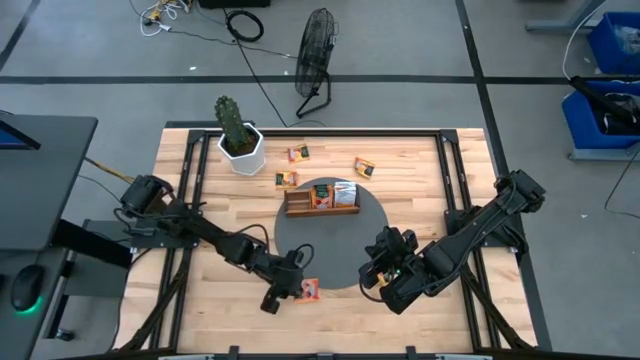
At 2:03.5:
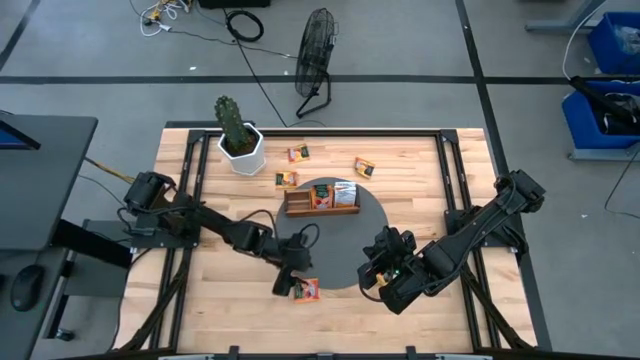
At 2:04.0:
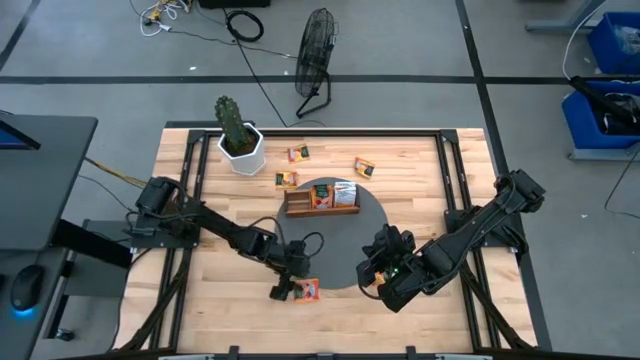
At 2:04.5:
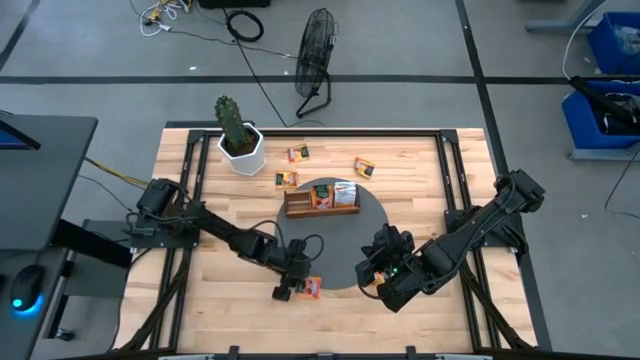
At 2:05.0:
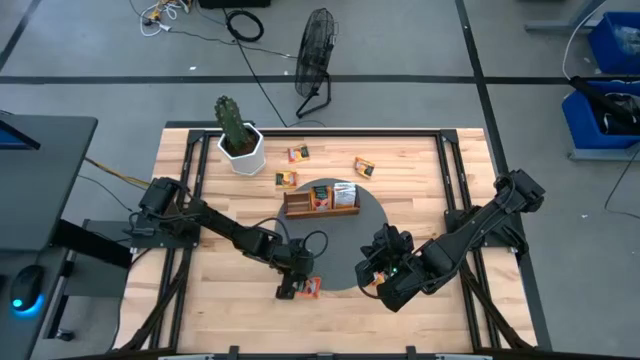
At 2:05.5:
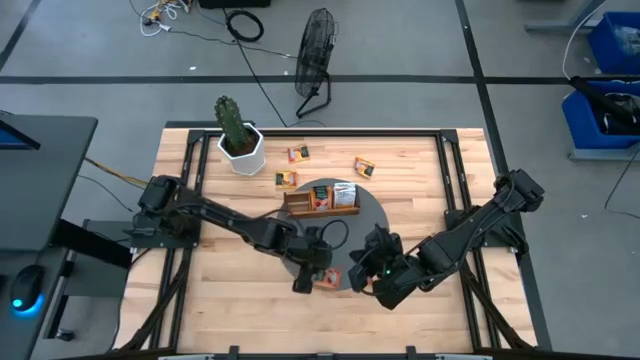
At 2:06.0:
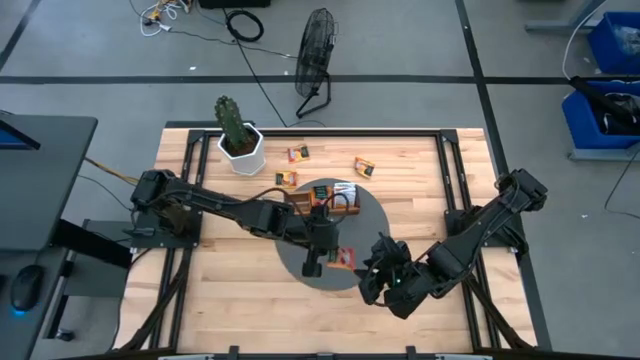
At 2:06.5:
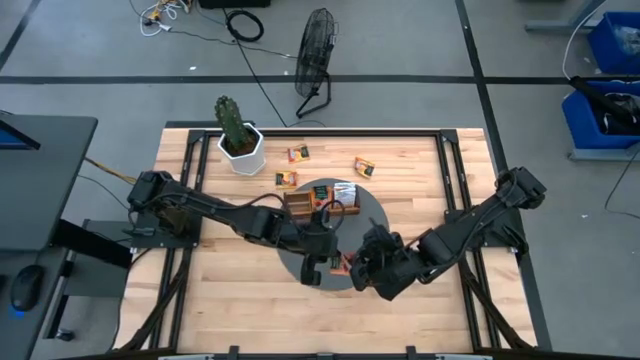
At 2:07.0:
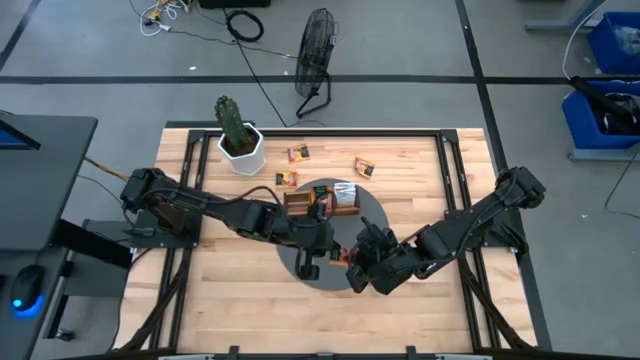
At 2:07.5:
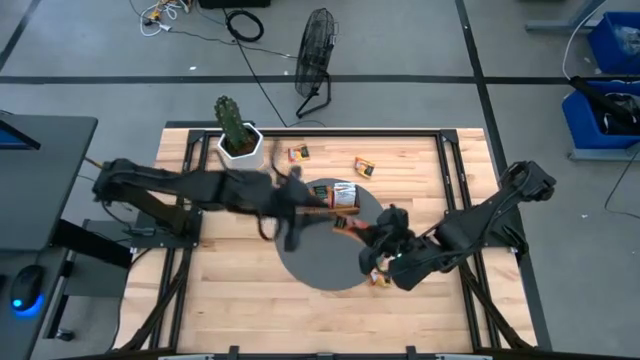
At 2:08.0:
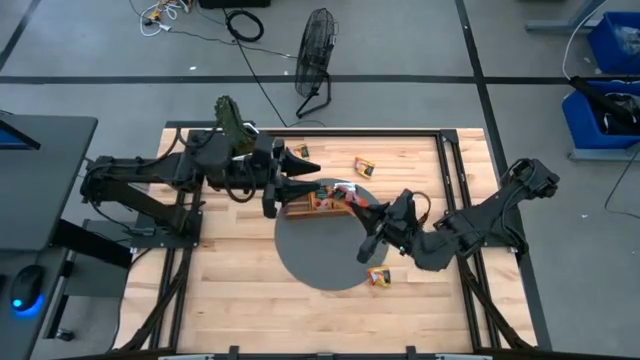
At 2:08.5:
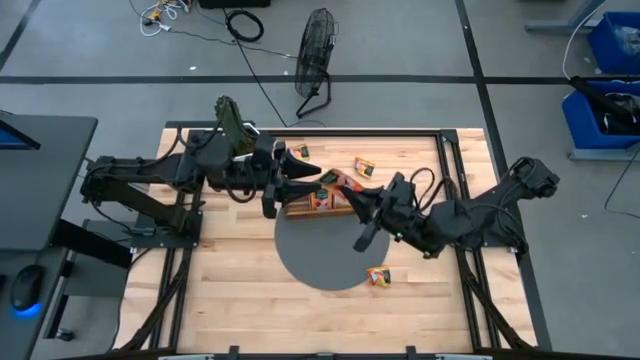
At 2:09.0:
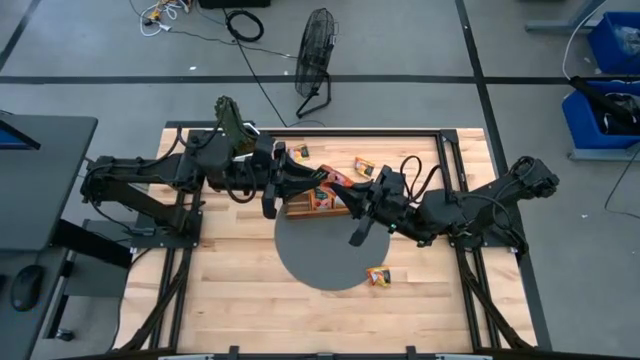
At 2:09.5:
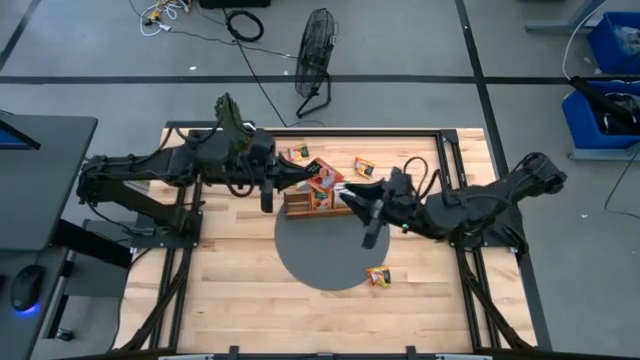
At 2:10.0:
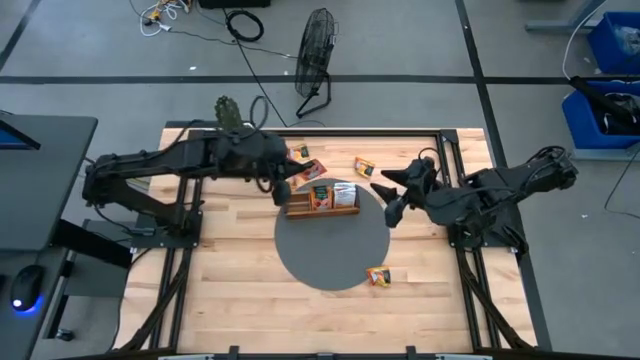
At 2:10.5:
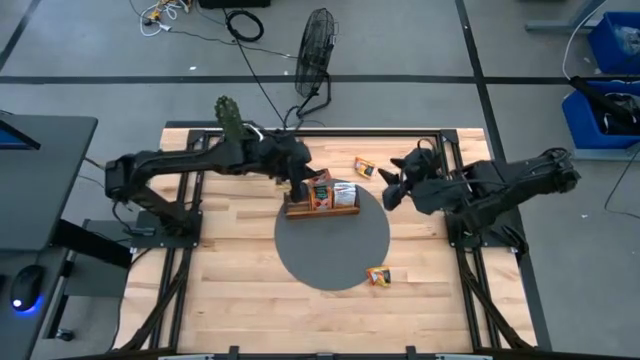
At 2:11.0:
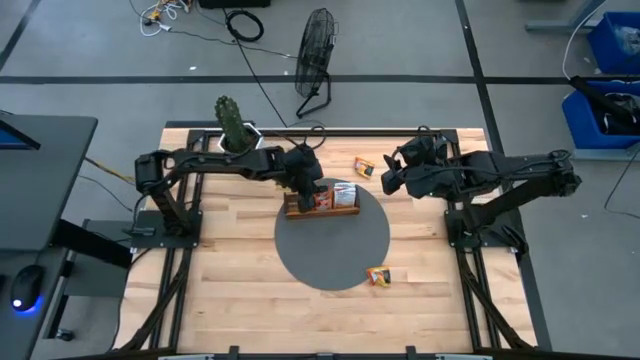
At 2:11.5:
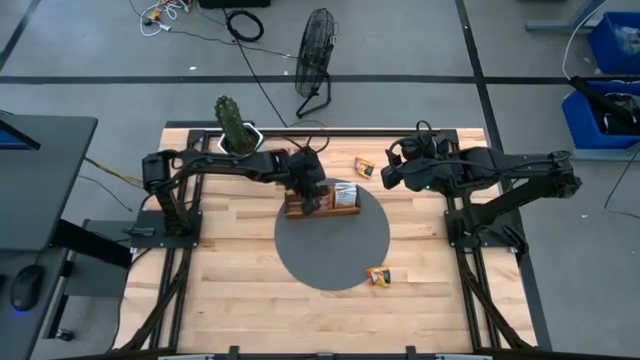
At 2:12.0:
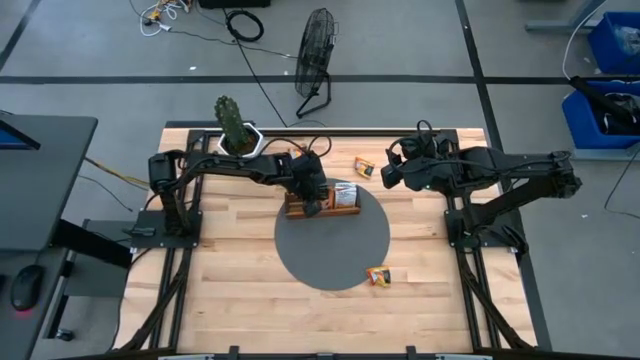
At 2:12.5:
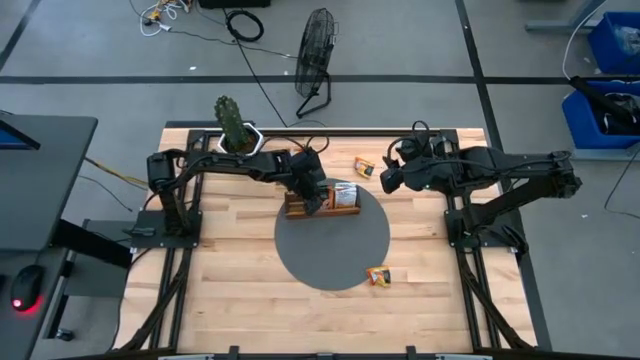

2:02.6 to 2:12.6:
Task: Pick & Place Tea
Put the pink tea bag into the middle section of the wooden organizer

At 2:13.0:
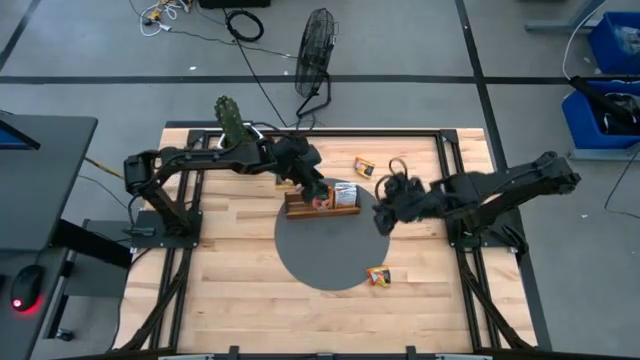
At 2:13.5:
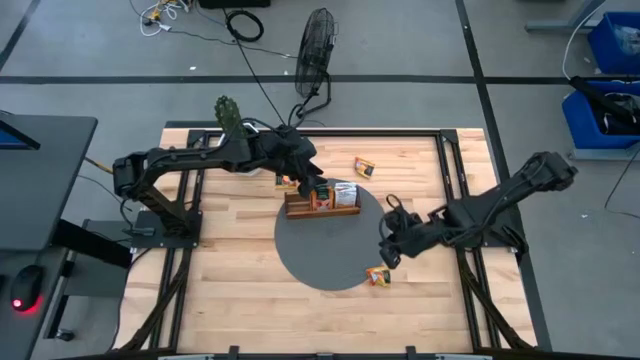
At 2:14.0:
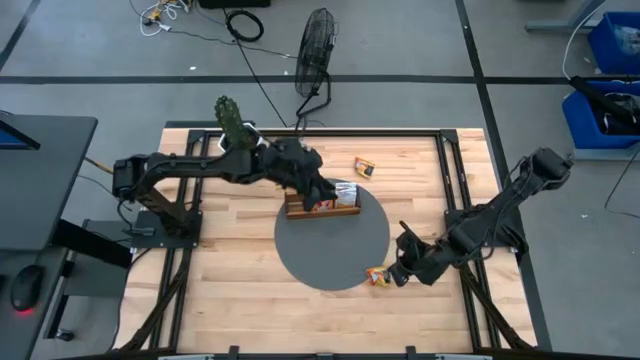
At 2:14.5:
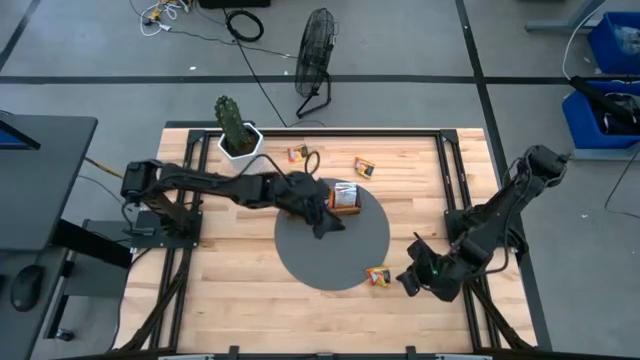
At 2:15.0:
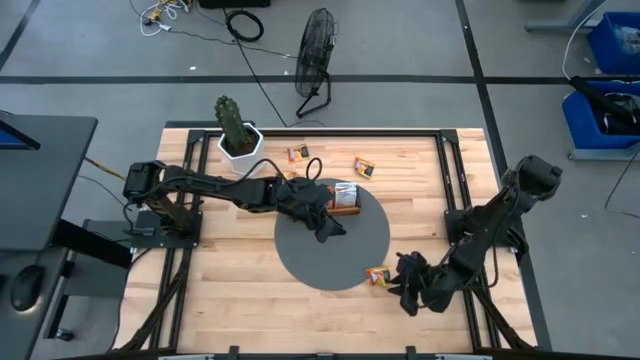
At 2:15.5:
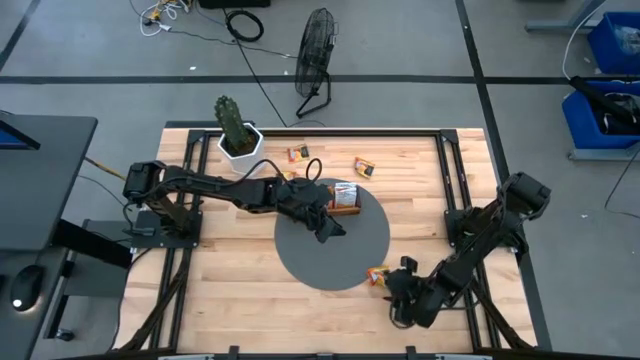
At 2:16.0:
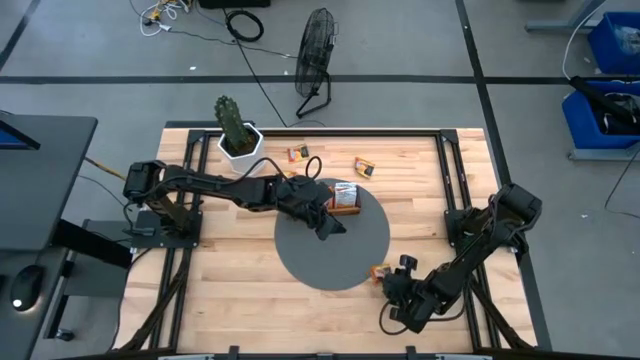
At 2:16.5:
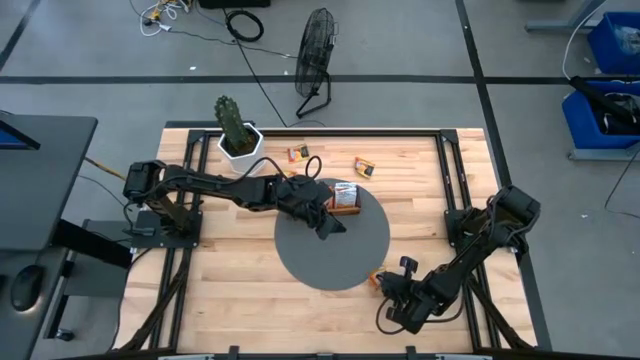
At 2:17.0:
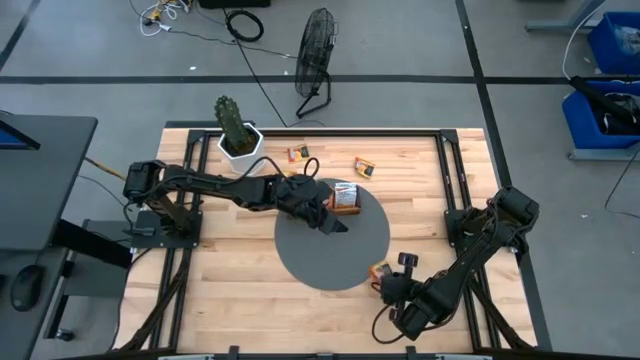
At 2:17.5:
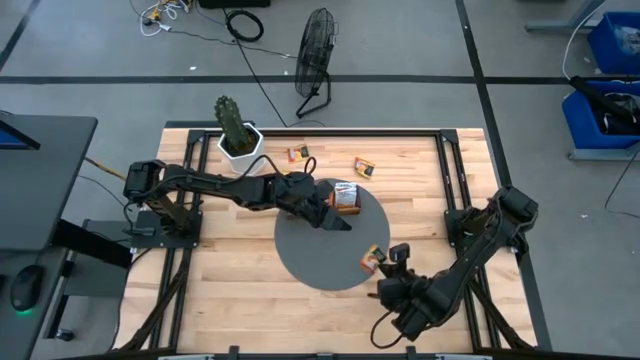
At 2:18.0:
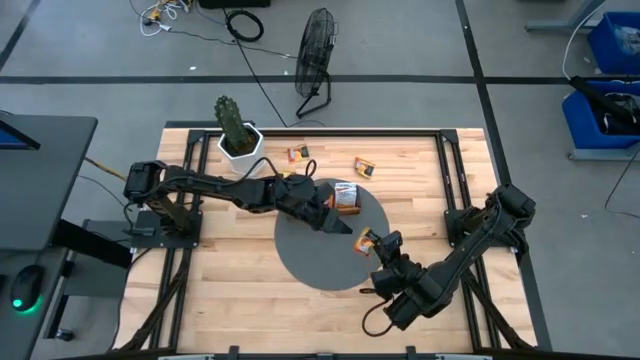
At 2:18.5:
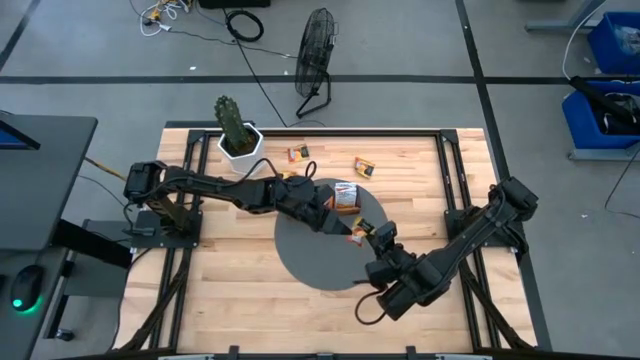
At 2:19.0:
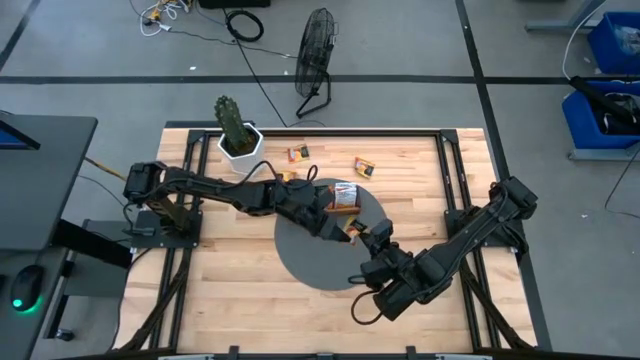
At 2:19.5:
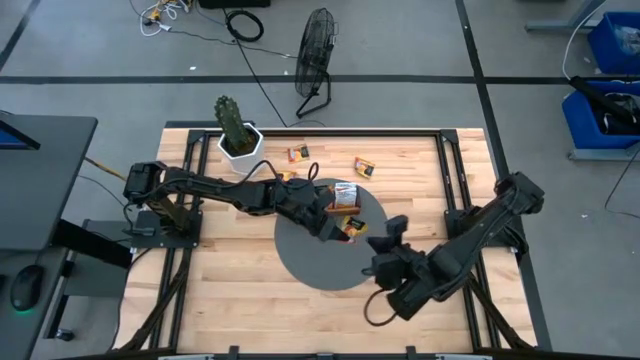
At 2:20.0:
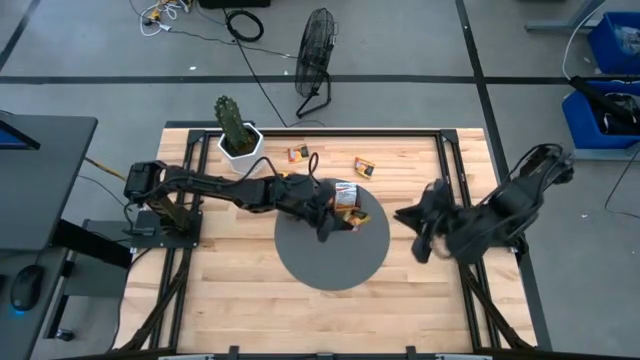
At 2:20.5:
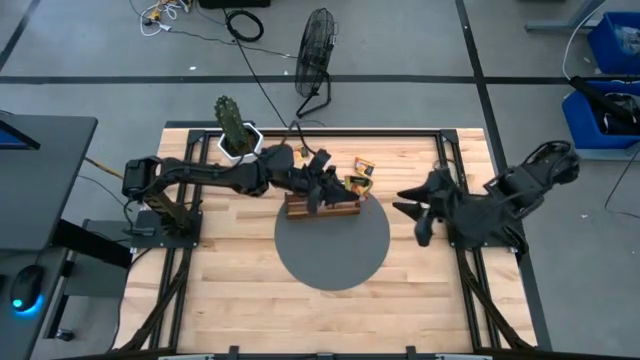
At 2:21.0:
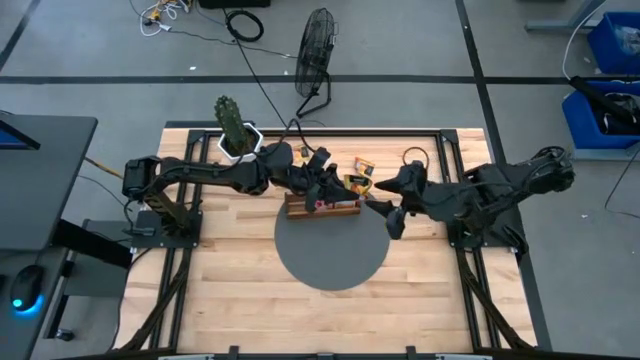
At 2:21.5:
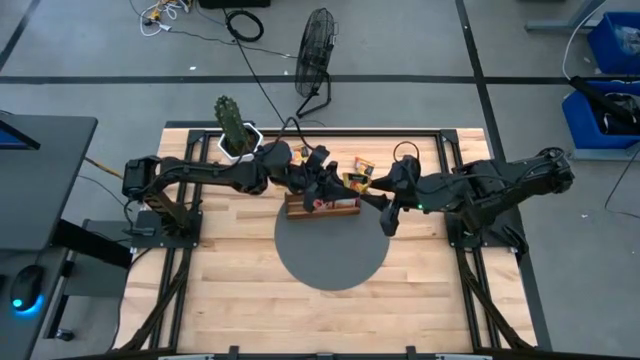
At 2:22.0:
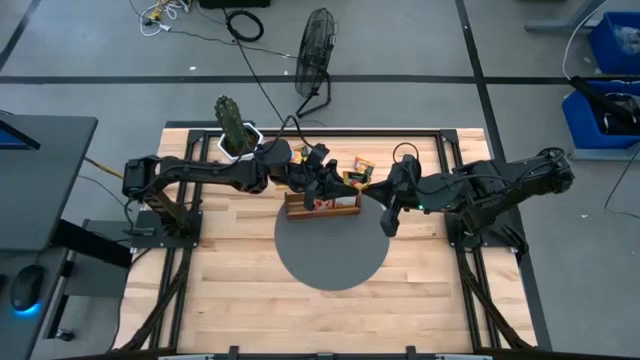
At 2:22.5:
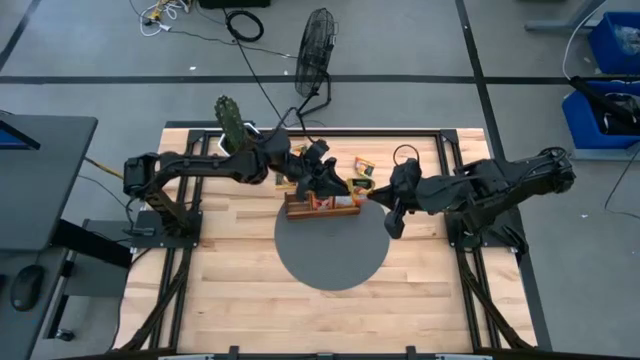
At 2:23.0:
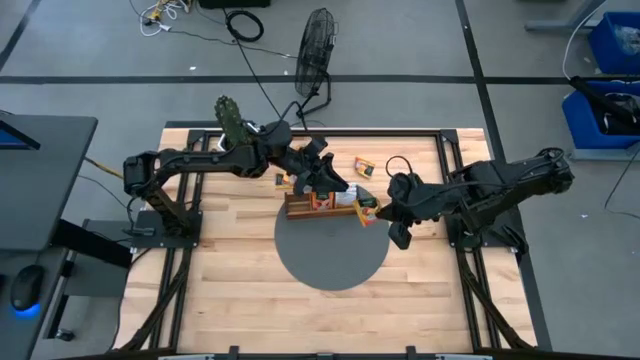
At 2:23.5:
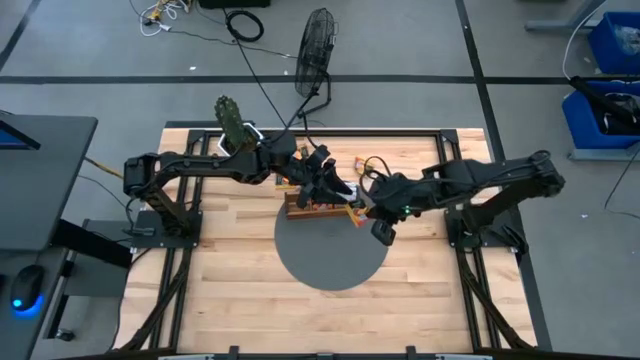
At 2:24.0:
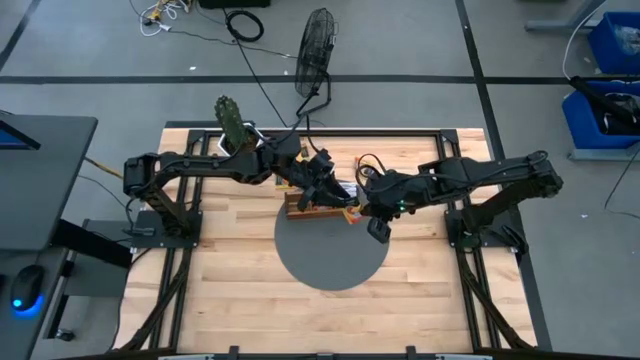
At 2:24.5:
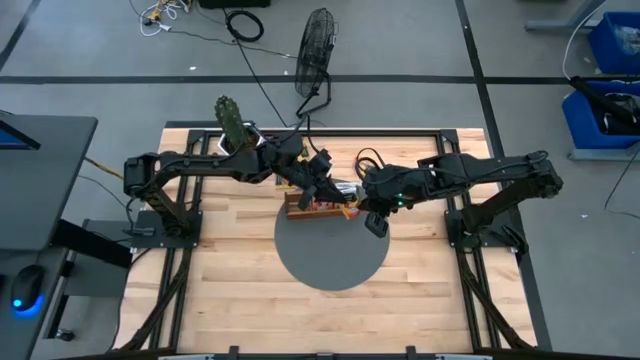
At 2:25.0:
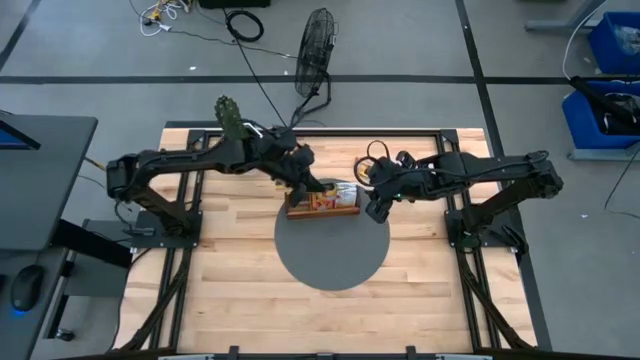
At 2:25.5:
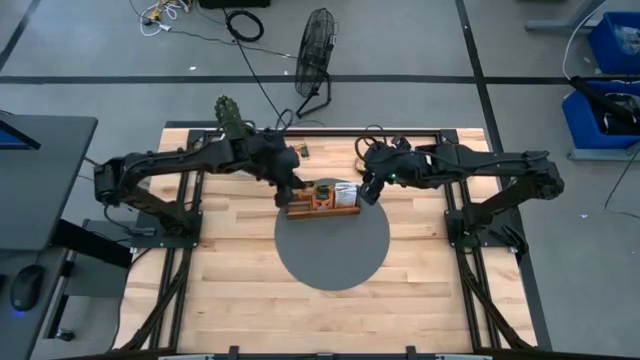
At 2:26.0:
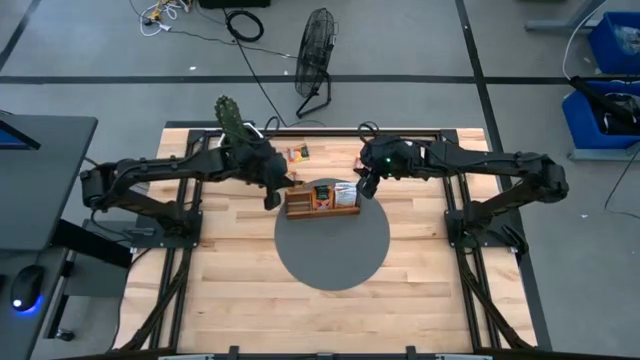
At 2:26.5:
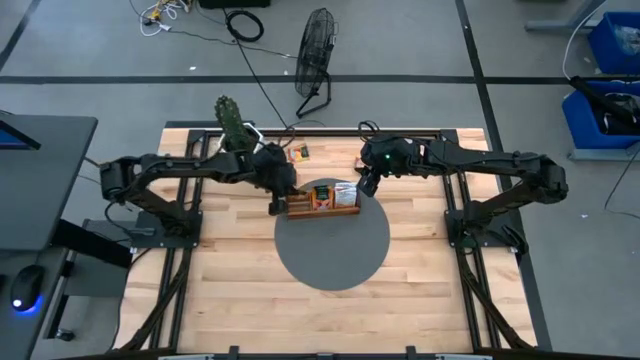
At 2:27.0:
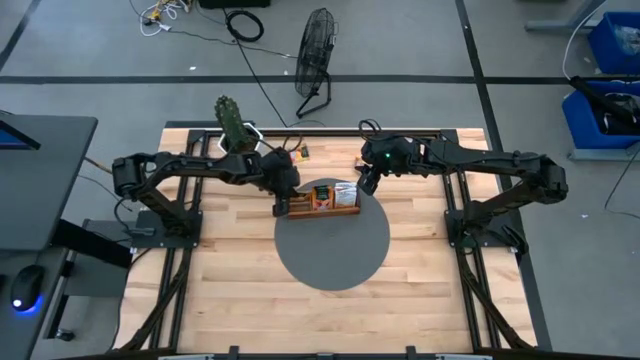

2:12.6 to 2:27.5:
Put the orange tea bag into the left section of the wooden organizer
